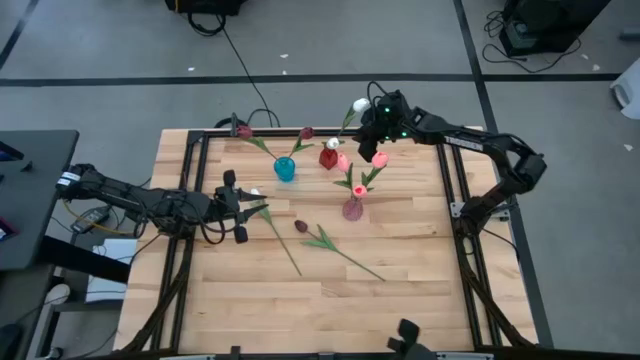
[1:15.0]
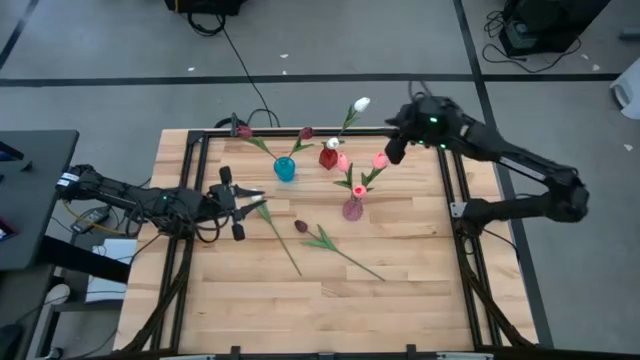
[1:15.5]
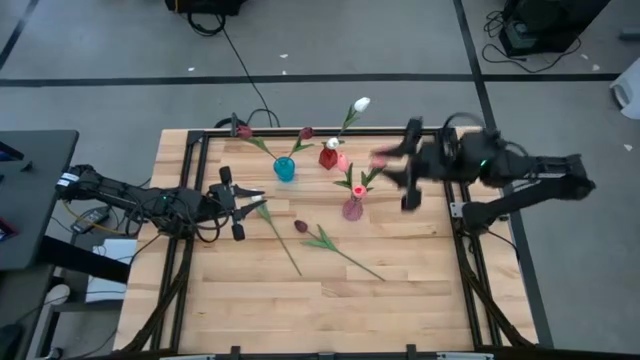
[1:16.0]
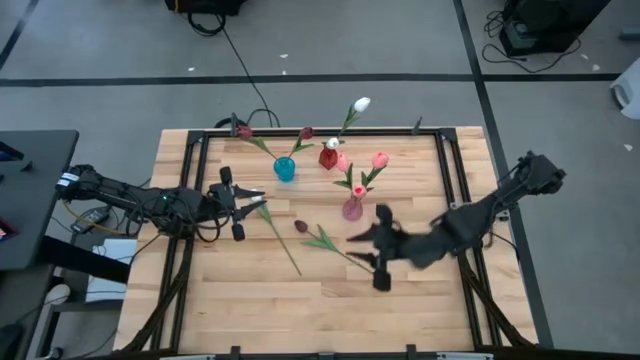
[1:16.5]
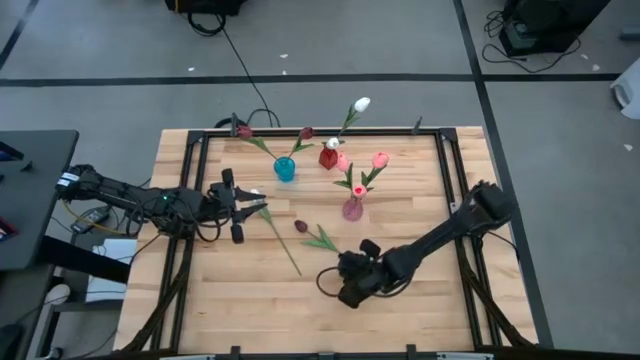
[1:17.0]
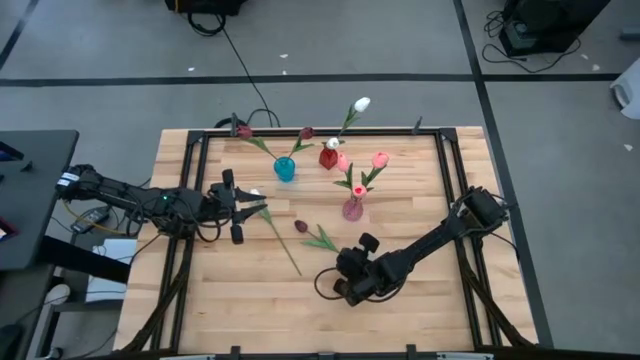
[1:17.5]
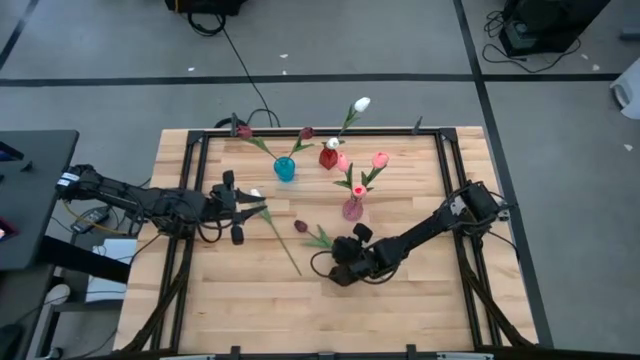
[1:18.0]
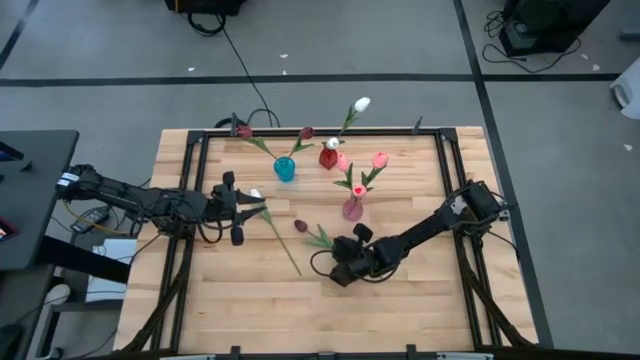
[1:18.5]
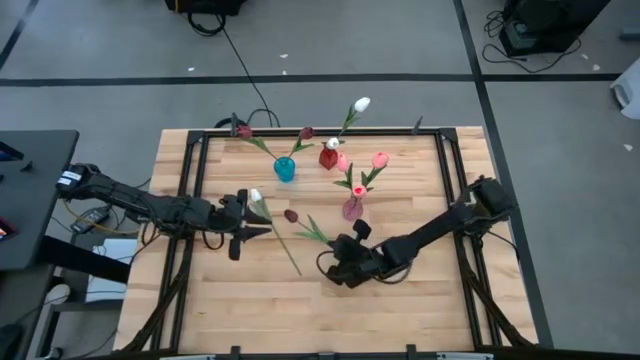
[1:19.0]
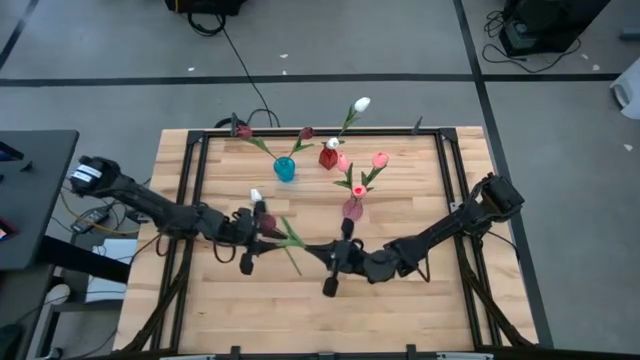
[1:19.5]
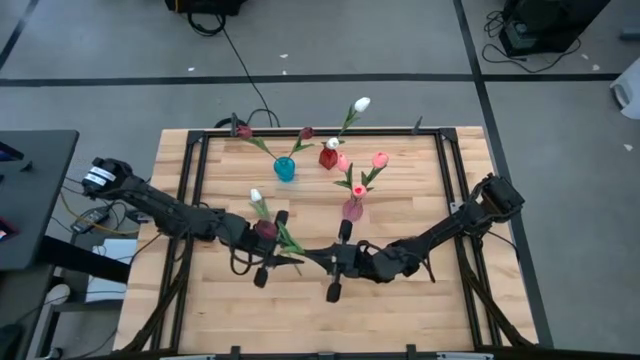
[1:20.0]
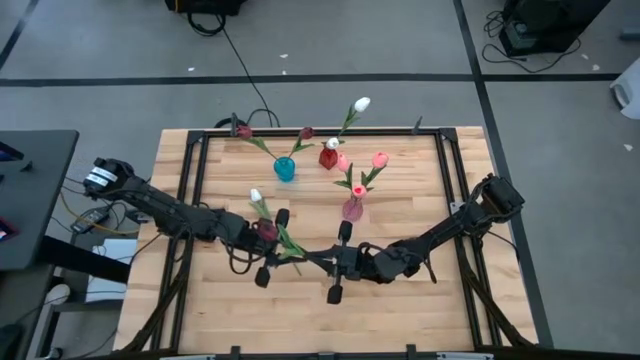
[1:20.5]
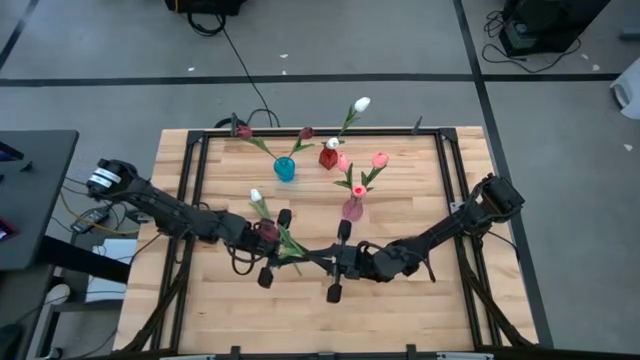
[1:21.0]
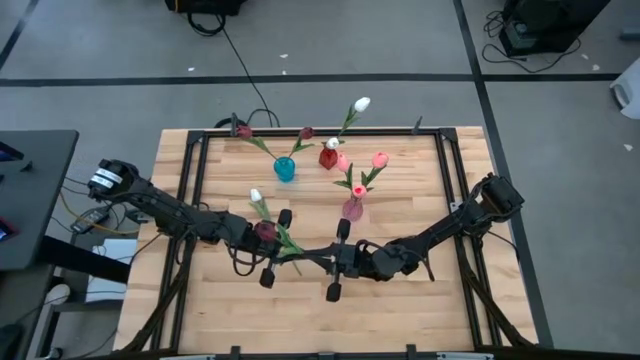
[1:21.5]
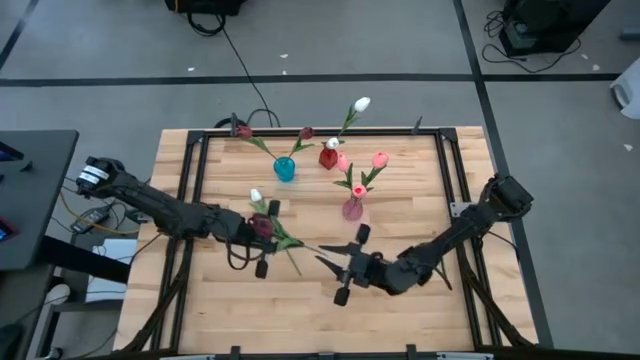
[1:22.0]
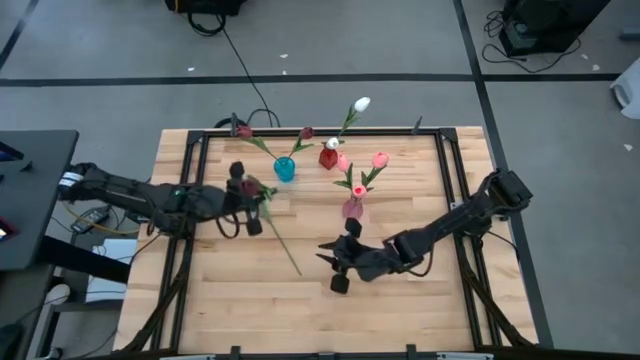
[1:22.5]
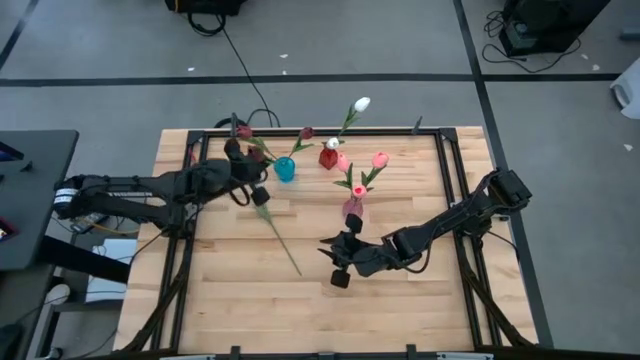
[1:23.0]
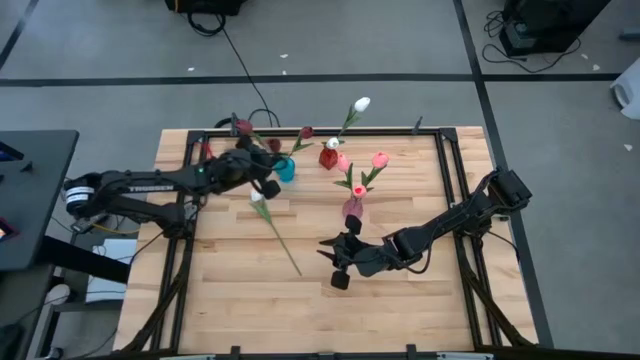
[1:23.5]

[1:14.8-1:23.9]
Task: Sort flowers into vase by color
Put the red tulip into the blue vase

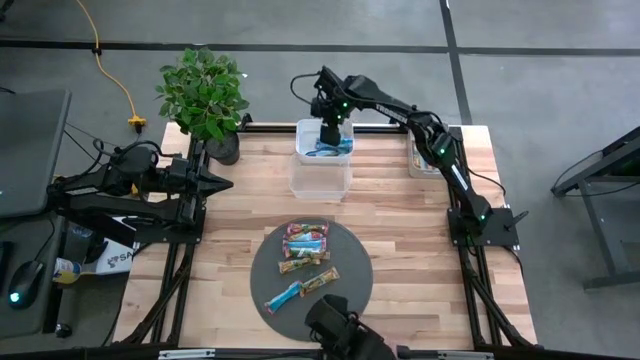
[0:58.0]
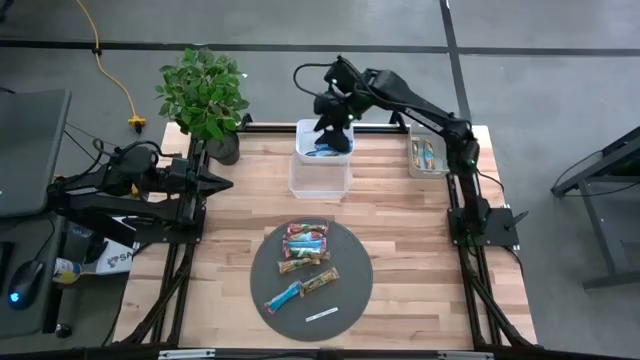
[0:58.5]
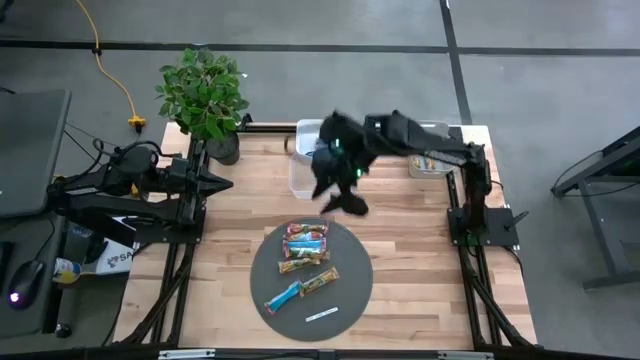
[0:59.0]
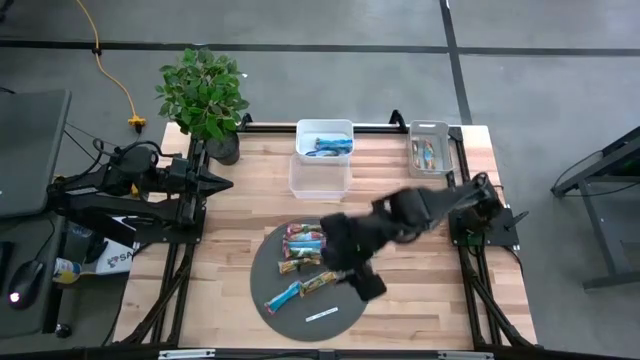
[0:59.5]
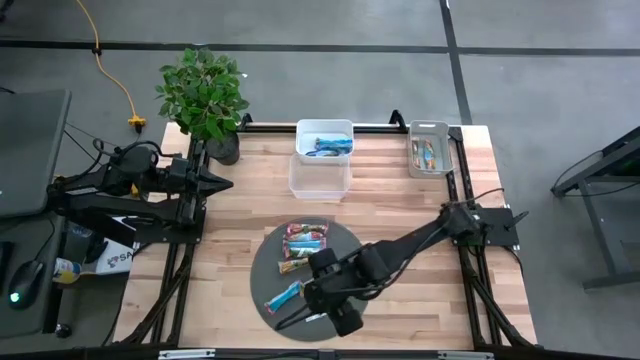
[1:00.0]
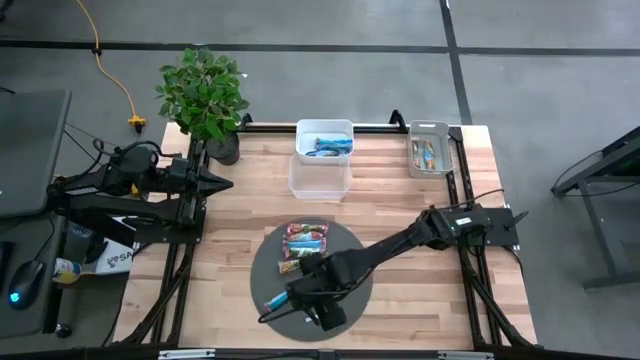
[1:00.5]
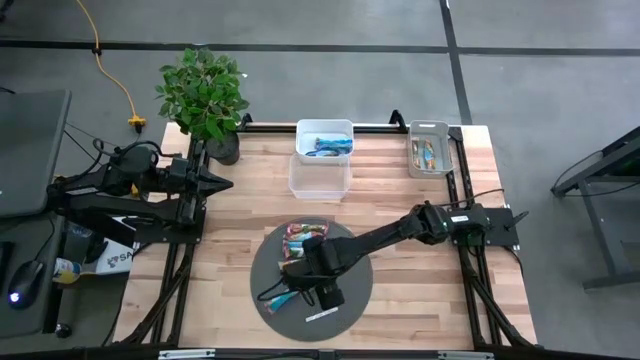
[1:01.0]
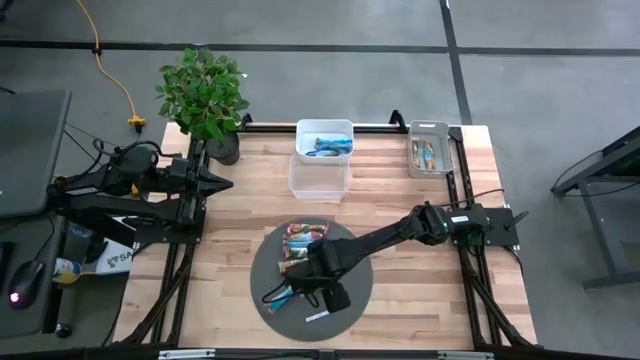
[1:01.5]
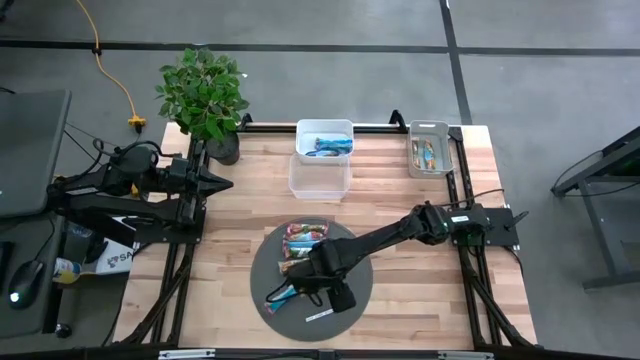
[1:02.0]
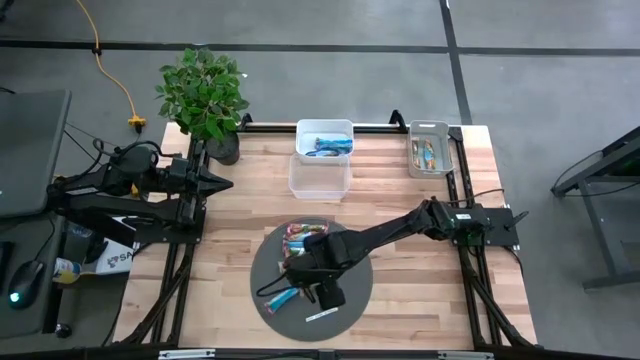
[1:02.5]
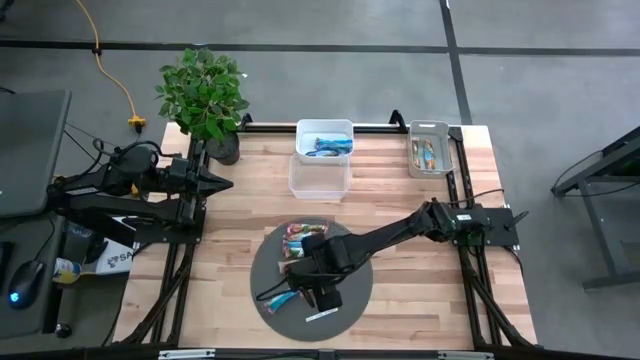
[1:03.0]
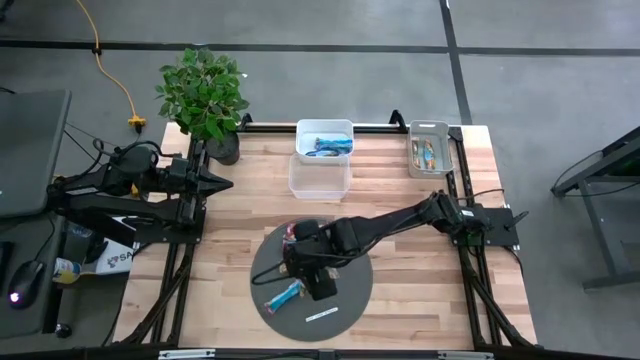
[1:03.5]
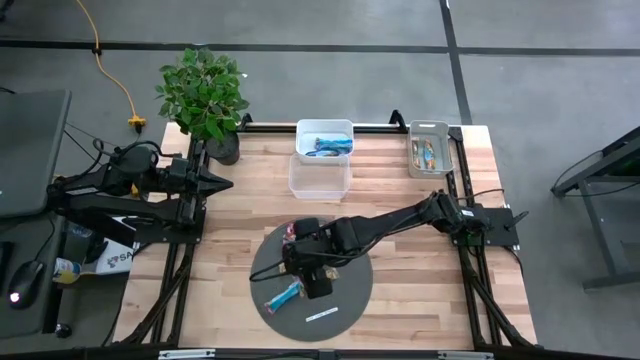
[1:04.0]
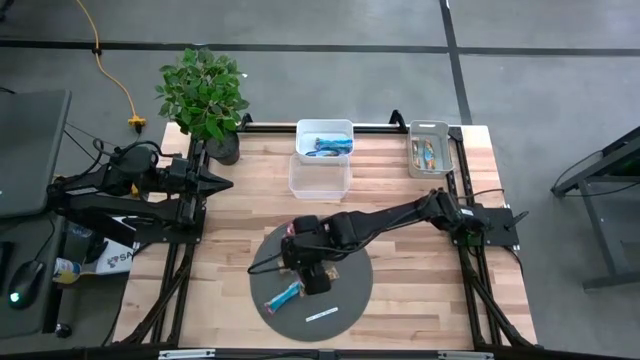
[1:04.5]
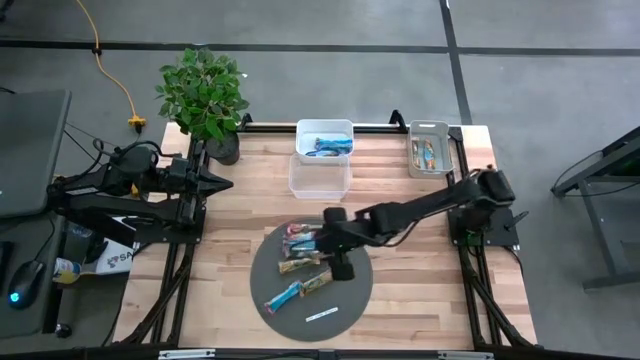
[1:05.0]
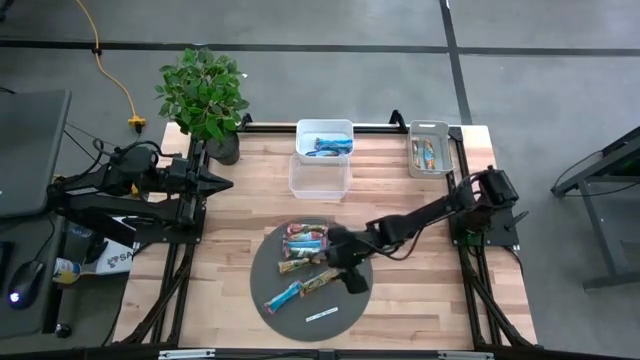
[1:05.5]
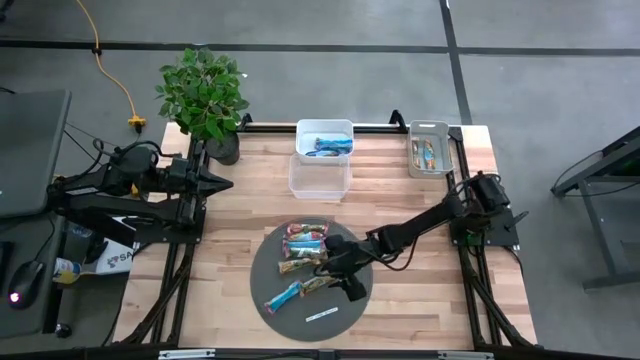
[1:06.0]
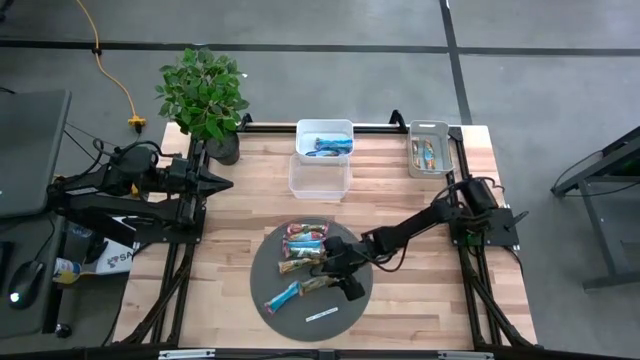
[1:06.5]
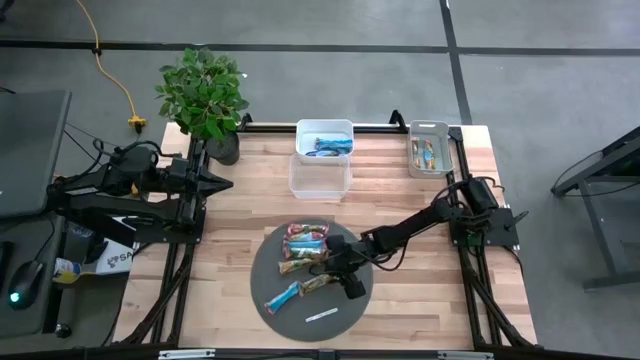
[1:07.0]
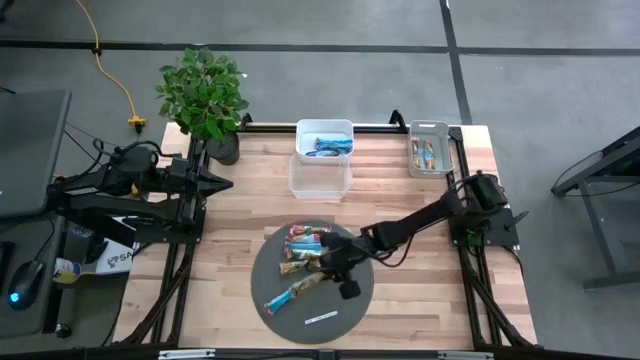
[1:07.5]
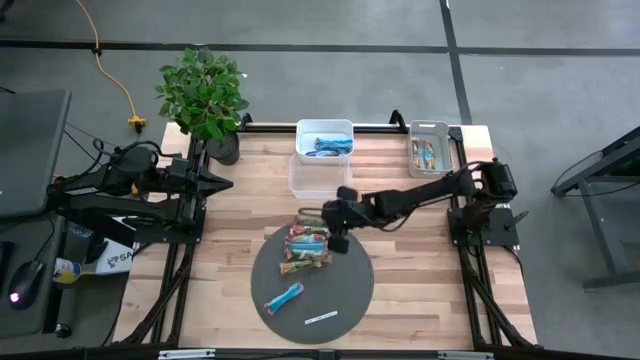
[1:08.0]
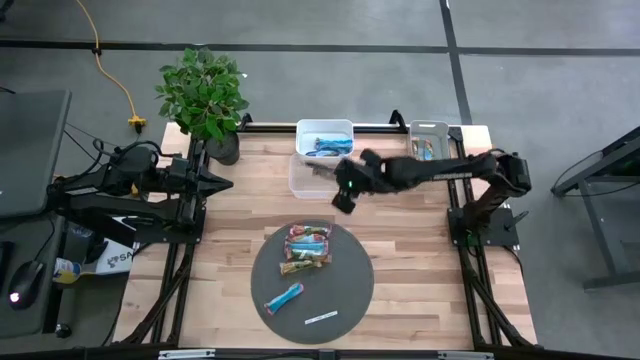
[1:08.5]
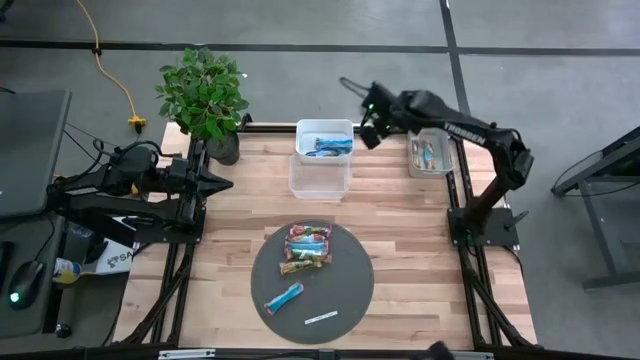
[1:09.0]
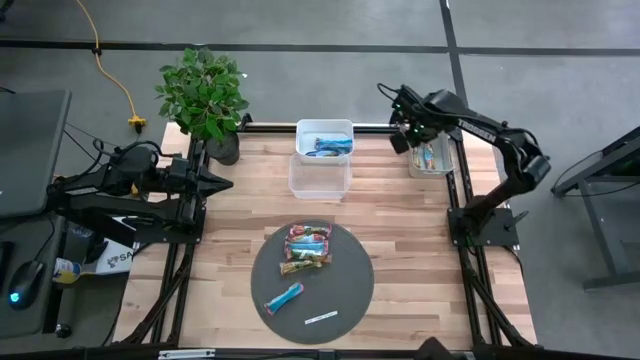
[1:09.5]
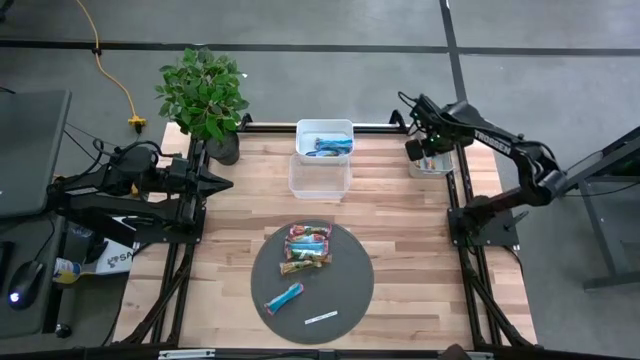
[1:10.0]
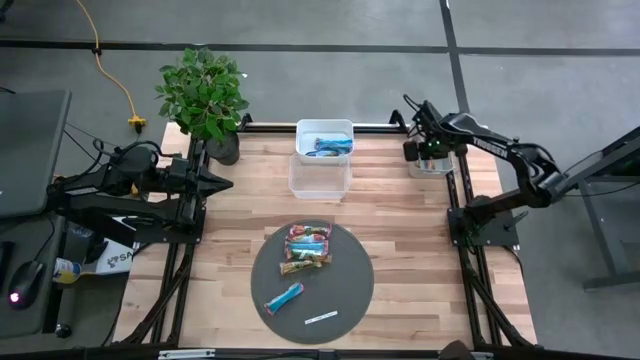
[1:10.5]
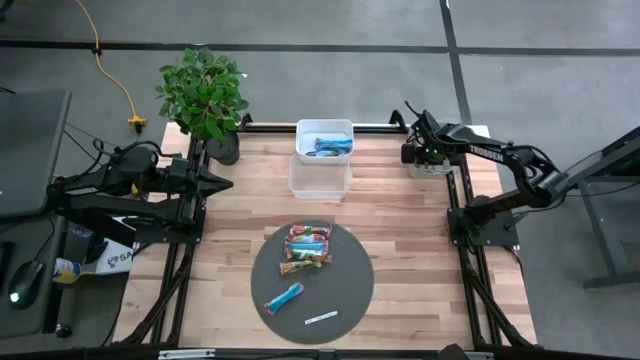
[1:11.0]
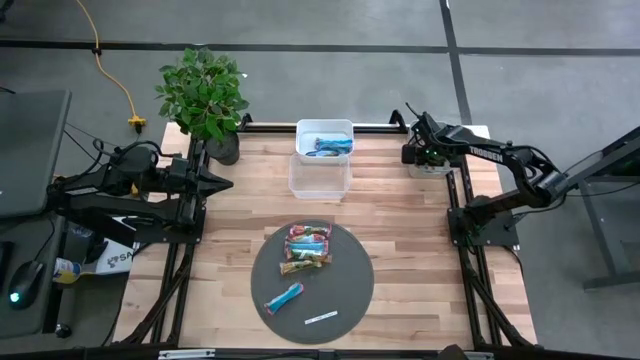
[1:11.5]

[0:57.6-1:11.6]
Task: Pick and place Granola Bars by type
Put the yellow granola bar into the gray bin
